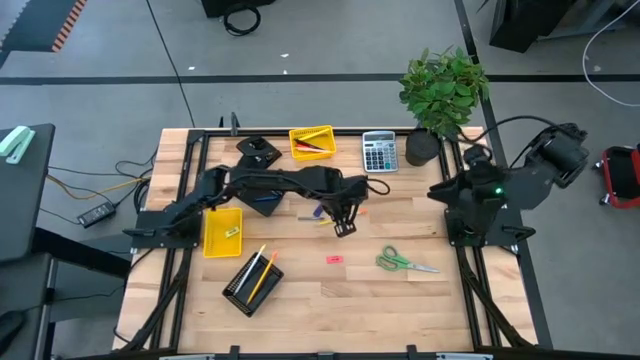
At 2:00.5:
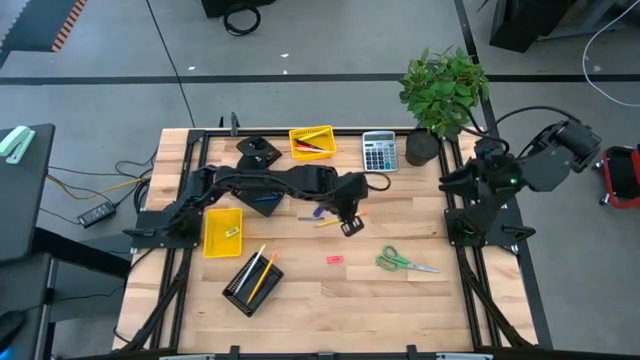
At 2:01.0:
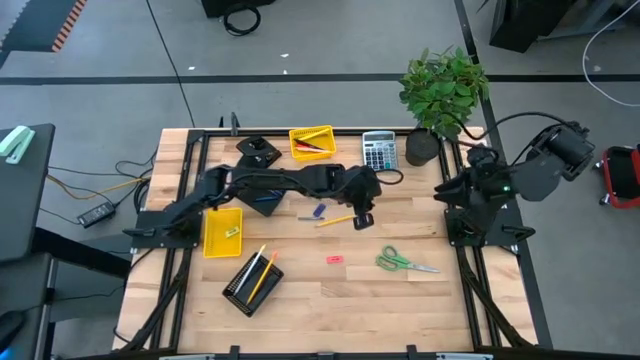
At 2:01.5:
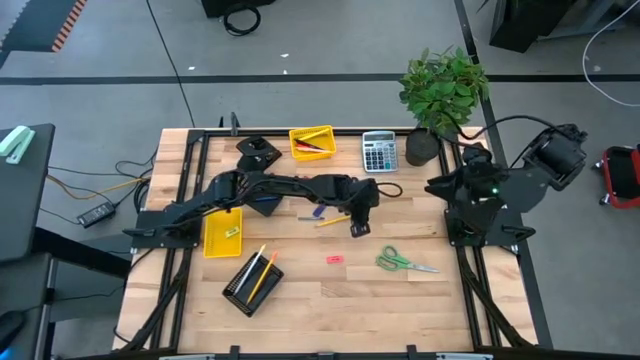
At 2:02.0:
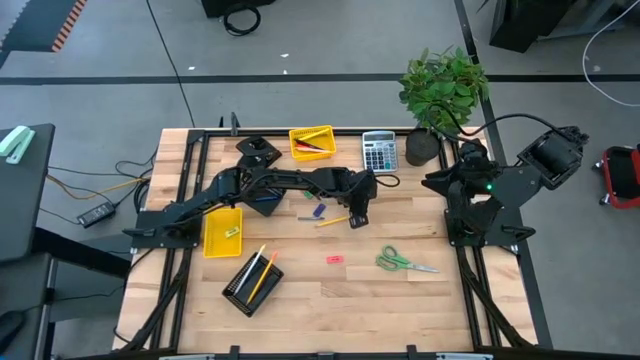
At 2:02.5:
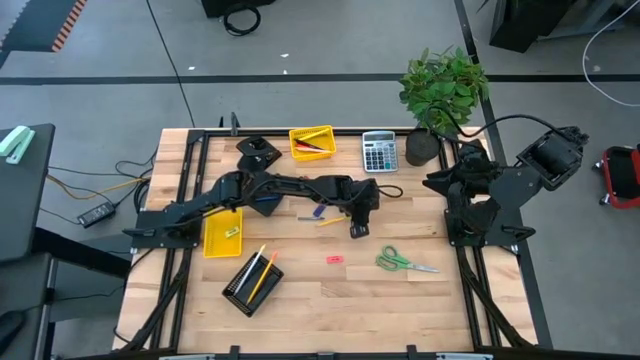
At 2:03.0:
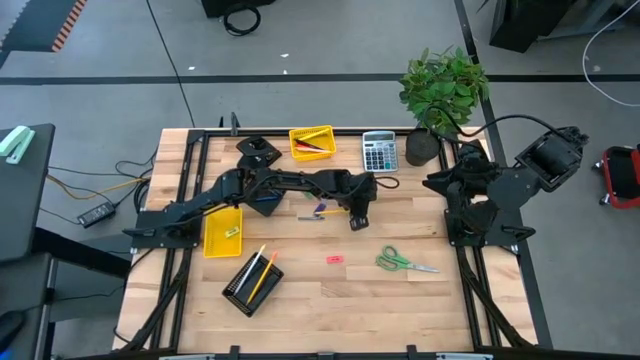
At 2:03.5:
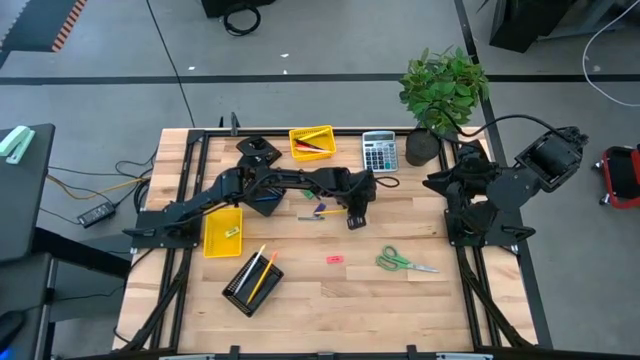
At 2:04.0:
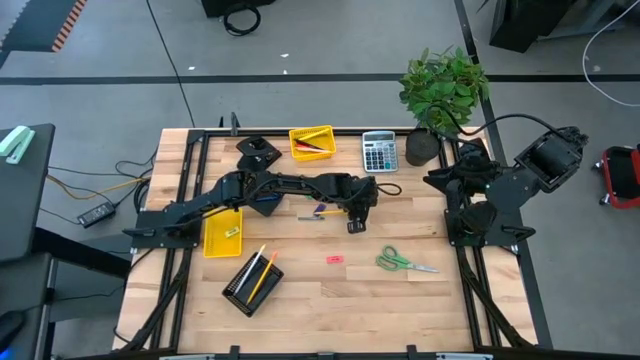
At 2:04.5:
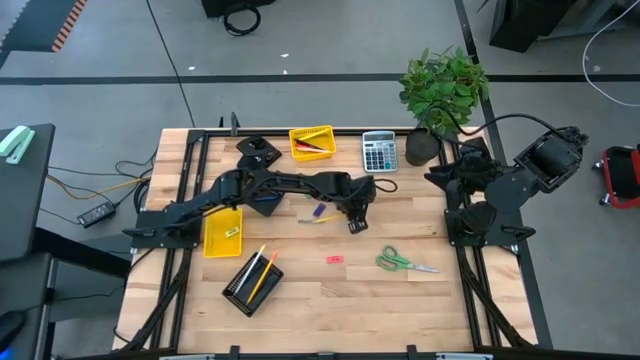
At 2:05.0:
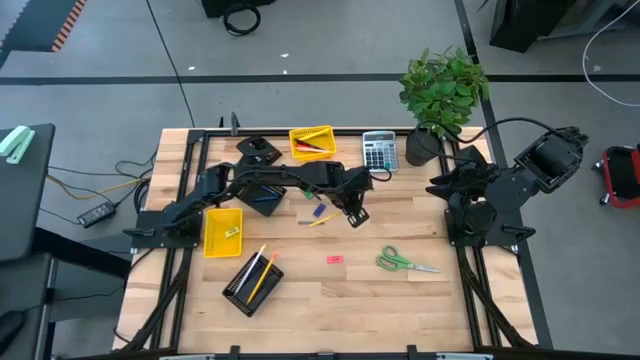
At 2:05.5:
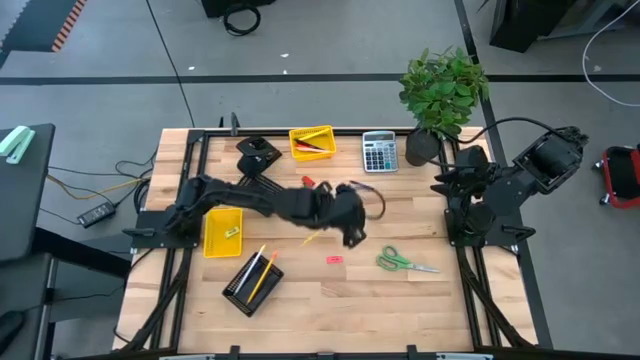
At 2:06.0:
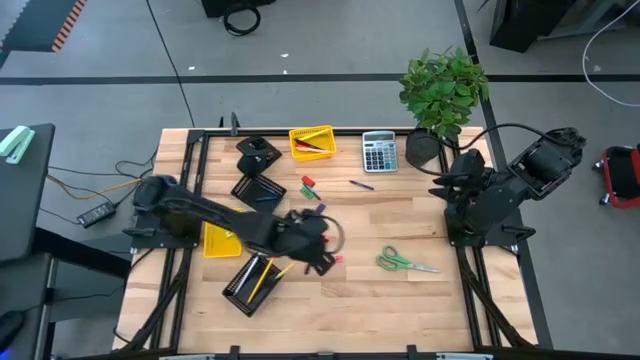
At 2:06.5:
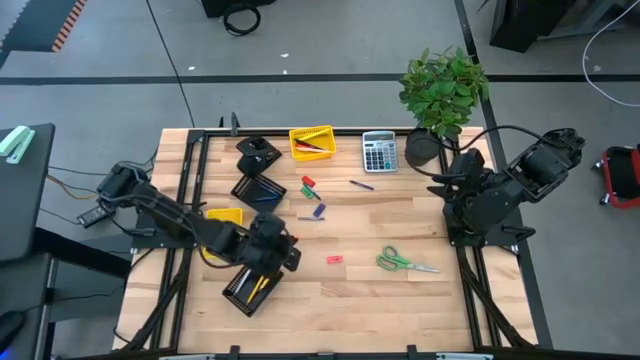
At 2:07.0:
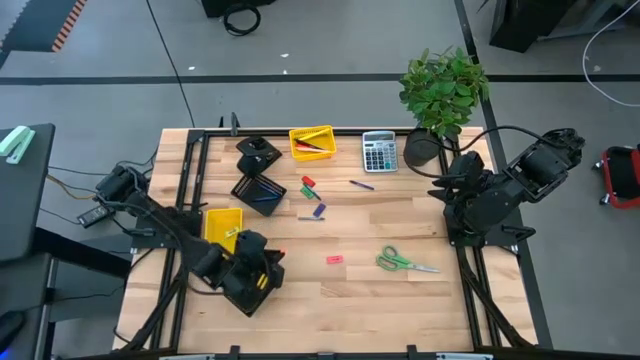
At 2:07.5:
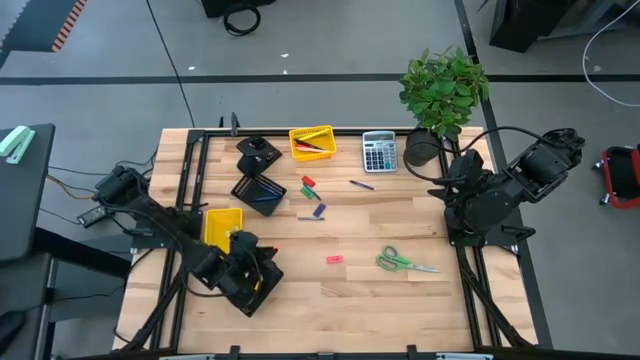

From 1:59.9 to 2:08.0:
Task: Sort crayons/erasers/pens/pencils in bins
Put the yellow pencil into the bottom black basket

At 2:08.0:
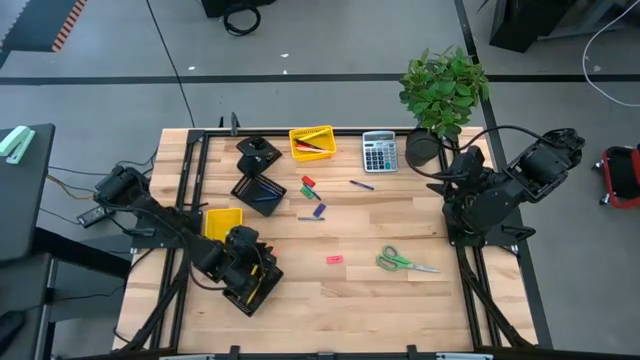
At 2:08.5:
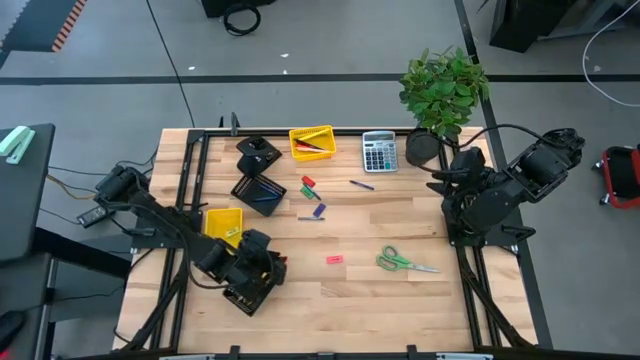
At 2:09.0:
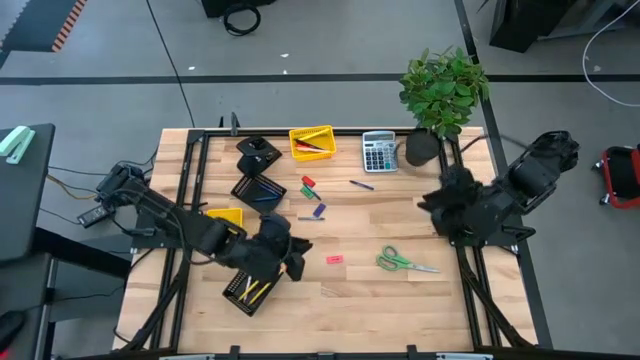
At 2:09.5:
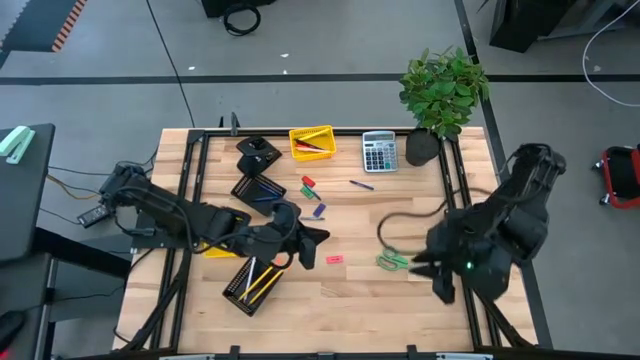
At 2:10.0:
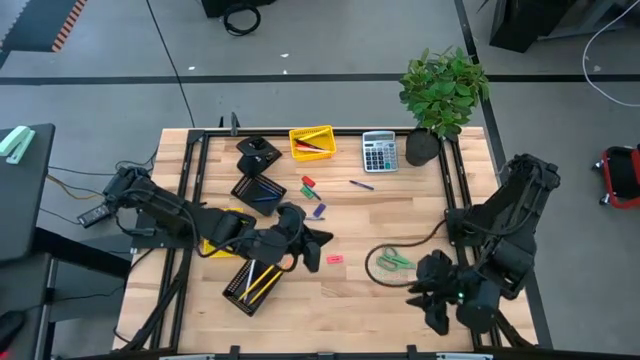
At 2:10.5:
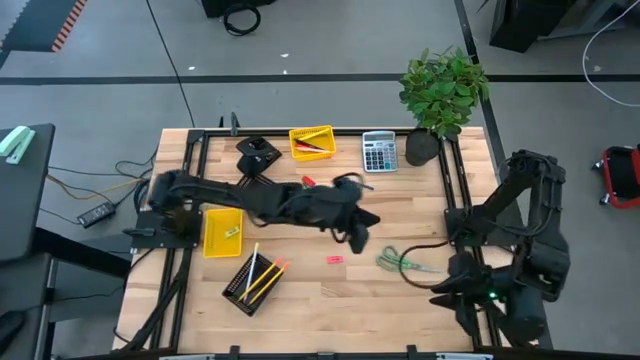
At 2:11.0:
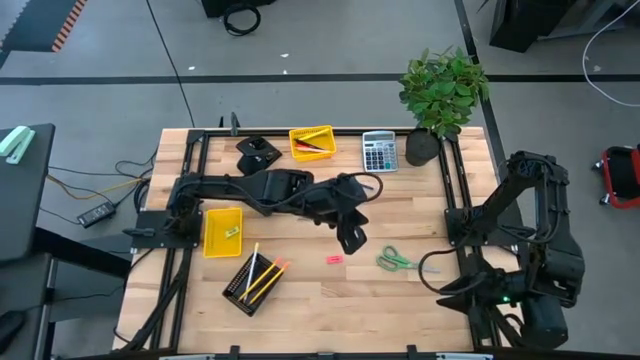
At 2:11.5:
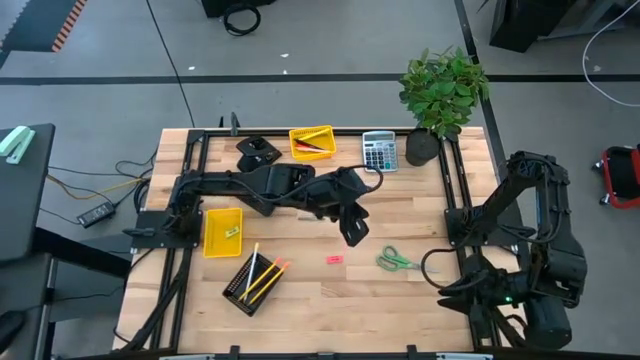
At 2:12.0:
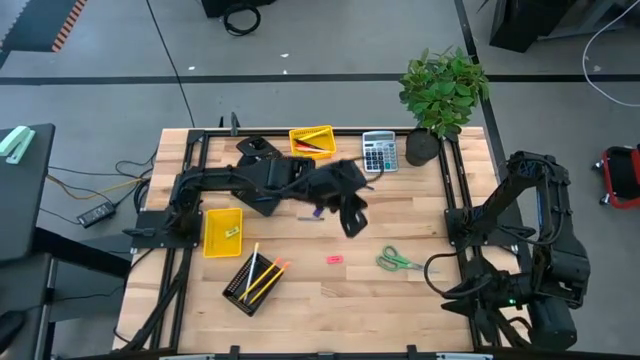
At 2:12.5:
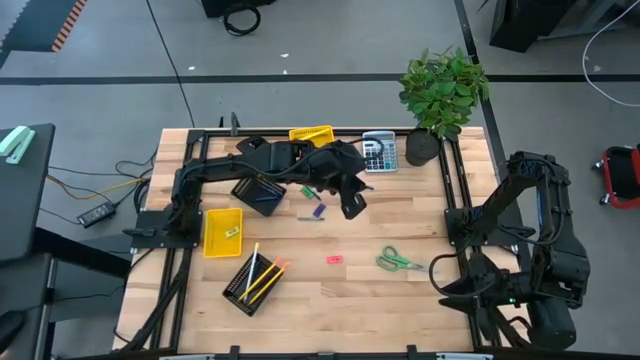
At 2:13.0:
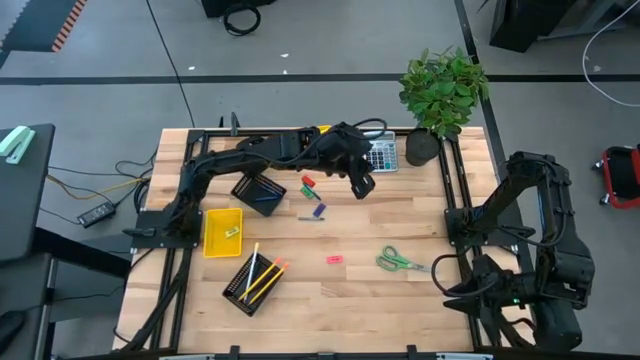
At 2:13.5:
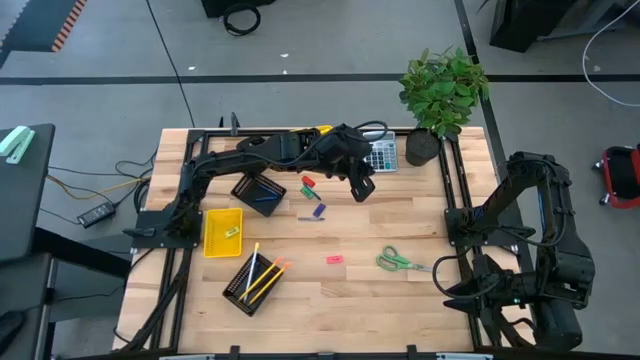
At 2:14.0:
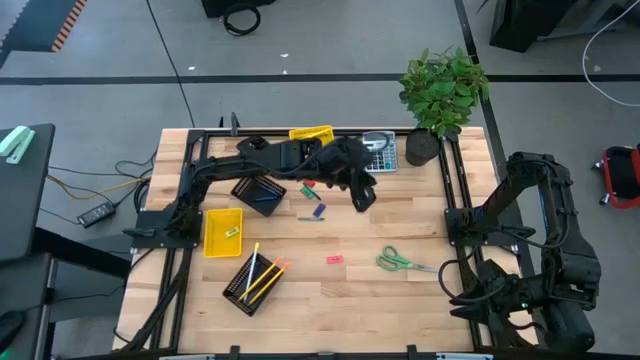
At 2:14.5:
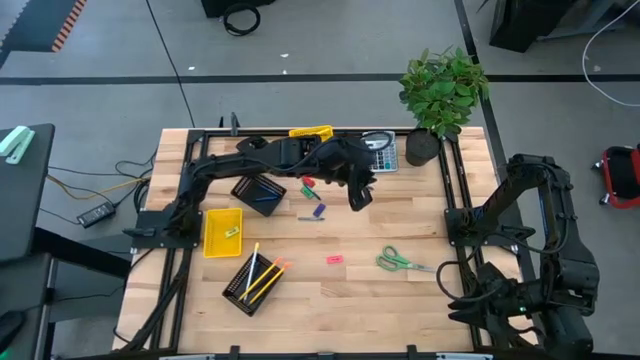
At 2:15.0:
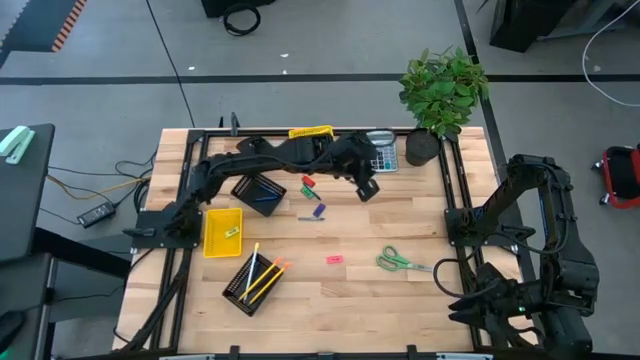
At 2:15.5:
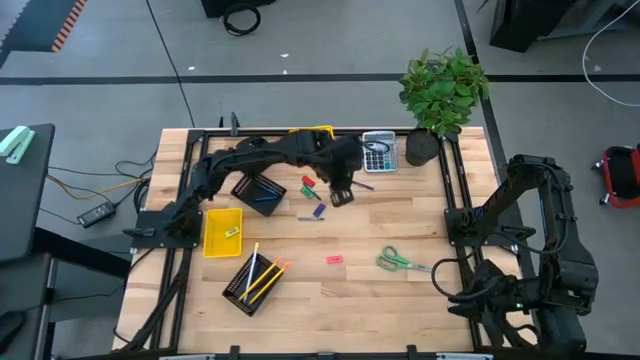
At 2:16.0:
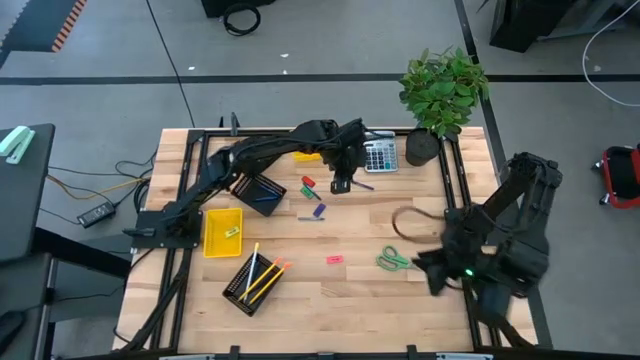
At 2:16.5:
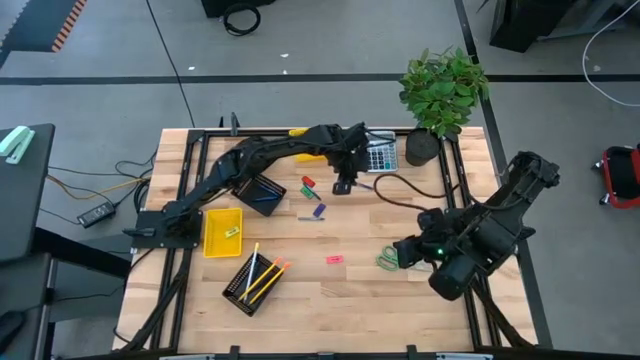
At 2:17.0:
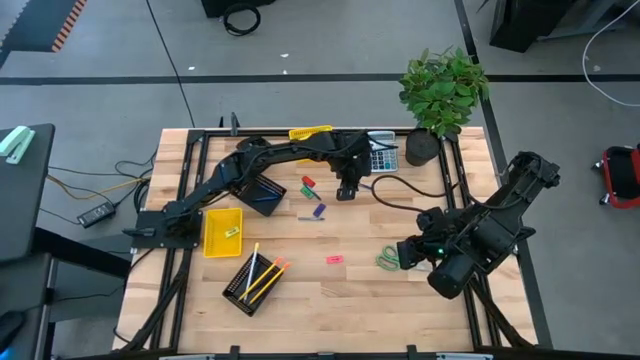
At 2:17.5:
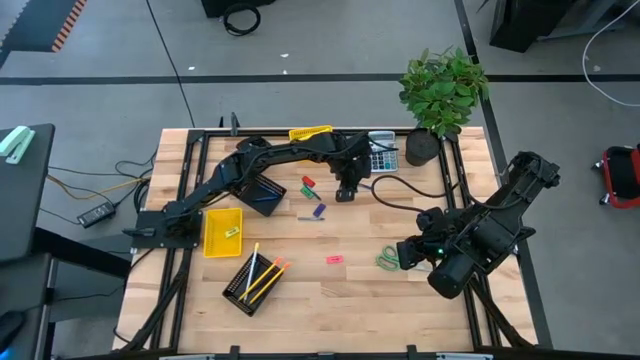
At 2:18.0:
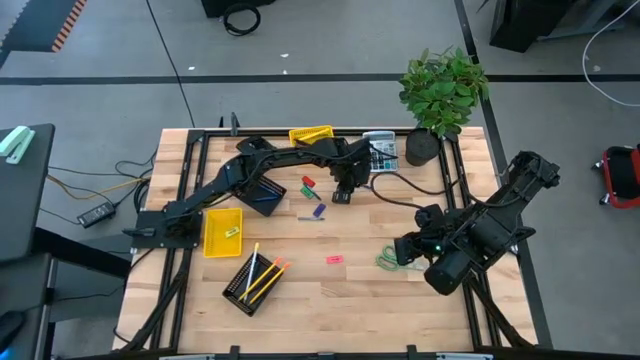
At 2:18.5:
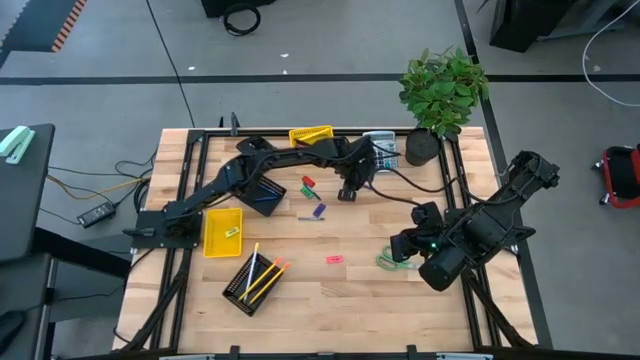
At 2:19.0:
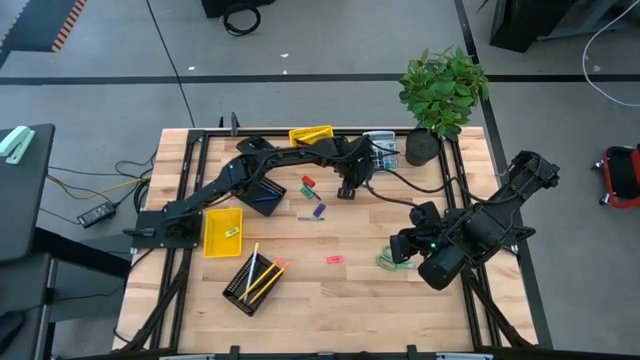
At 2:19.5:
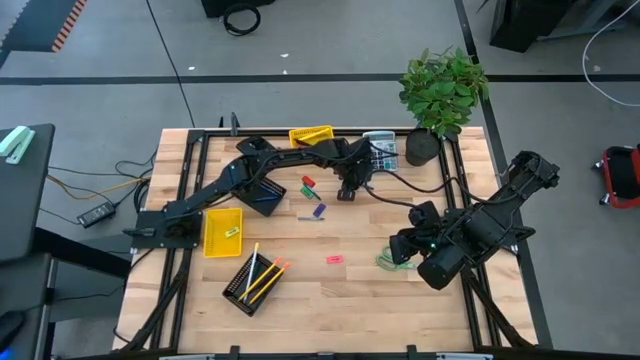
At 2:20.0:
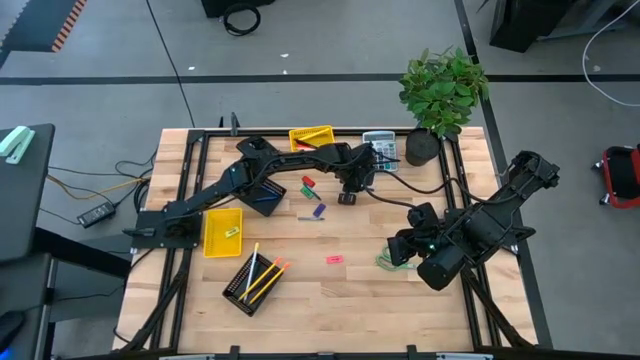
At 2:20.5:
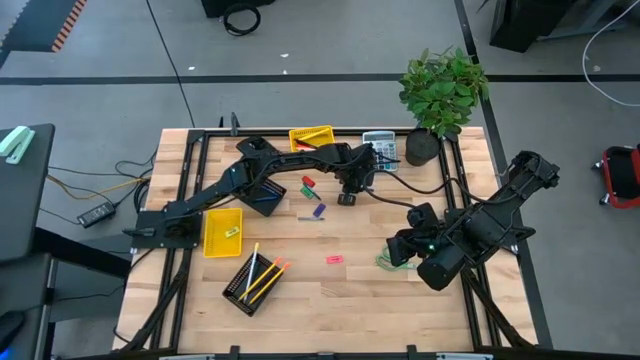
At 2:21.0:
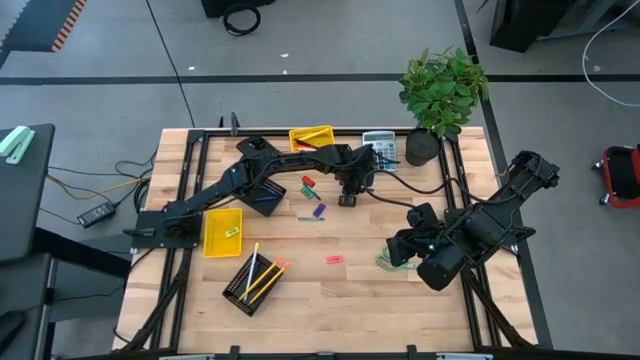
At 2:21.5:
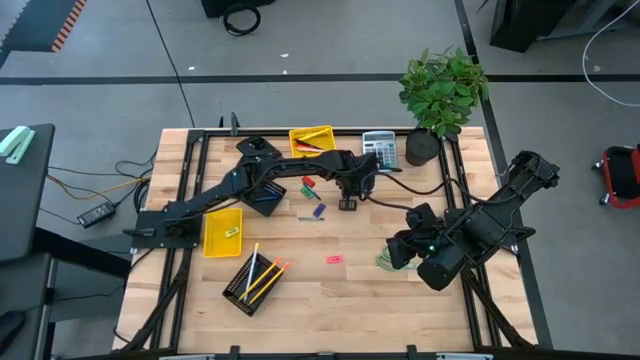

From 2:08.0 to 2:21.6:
Put the blue crayon into the top black basket
